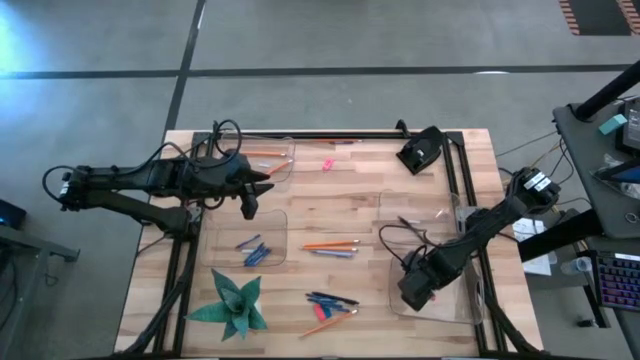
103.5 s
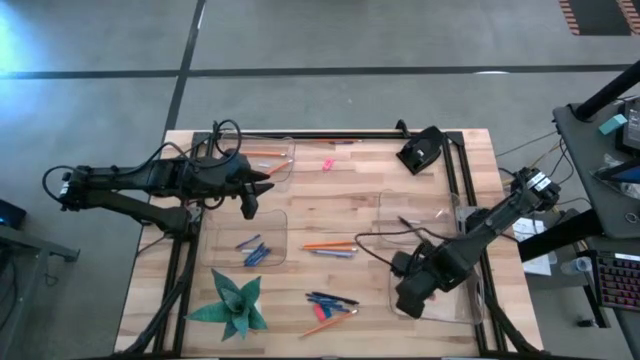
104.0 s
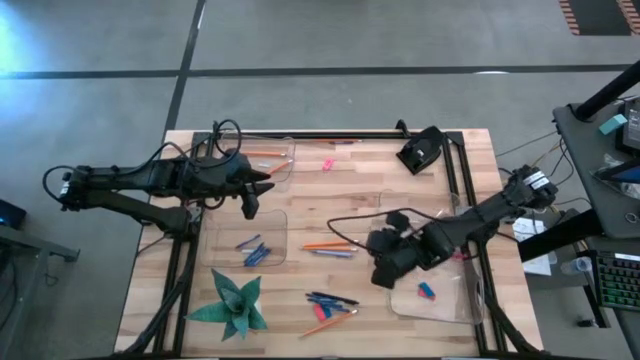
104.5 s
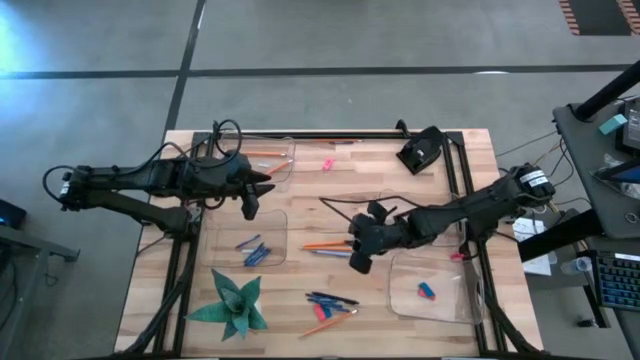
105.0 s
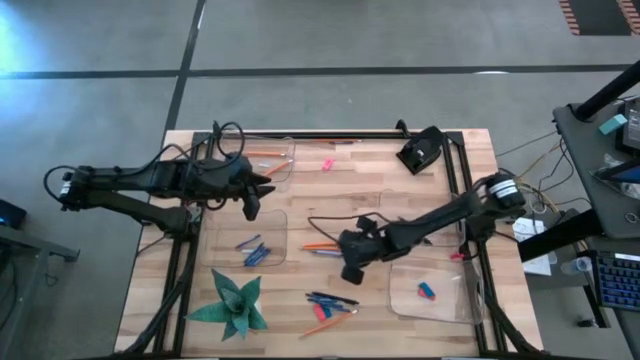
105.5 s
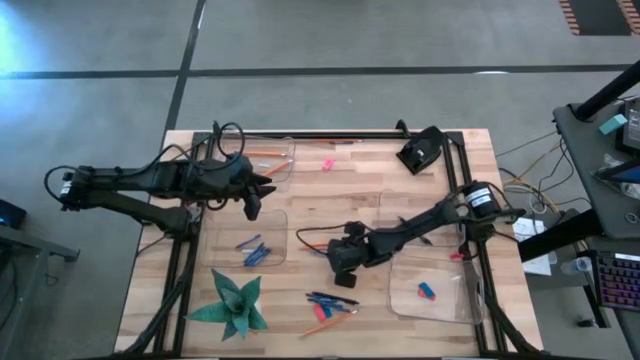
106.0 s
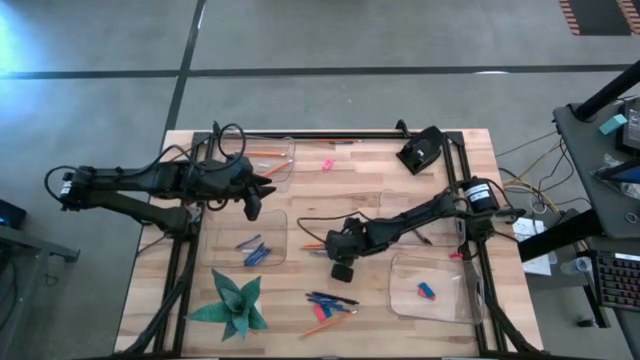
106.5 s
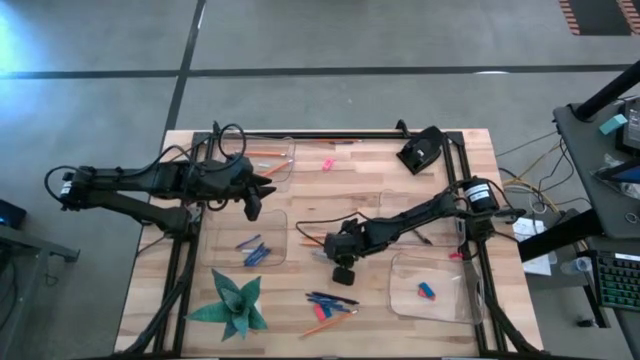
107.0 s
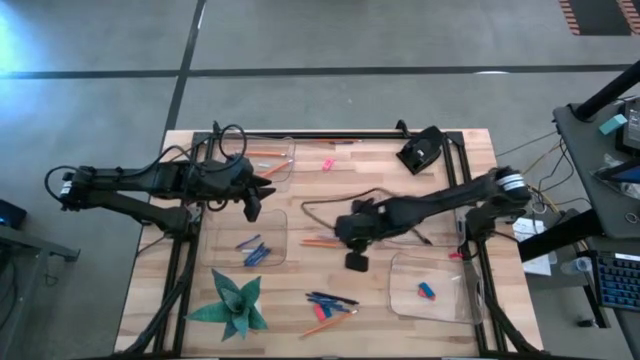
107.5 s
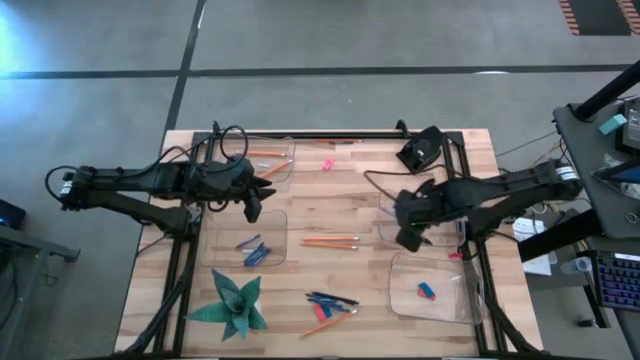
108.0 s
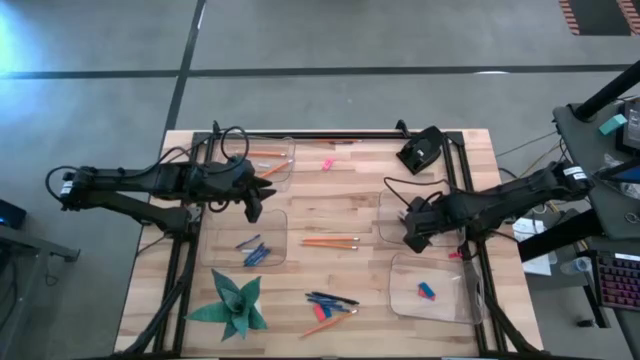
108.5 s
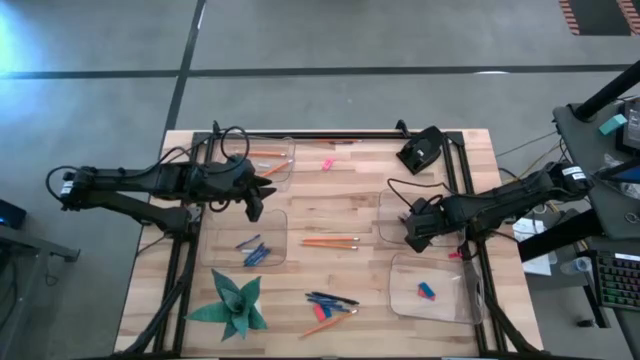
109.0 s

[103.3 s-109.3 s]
Task: Sort crayons/erasers/pens/pencils in bins
Put the light blue pen into the middle right transparent bin

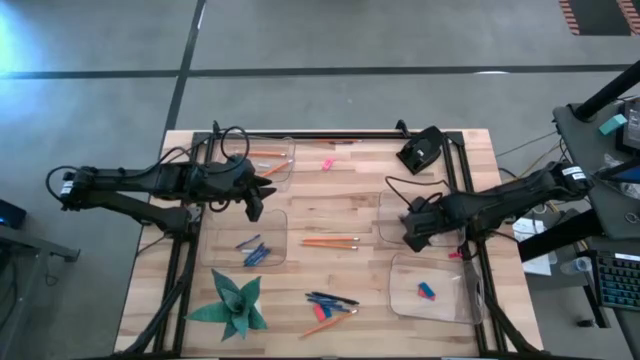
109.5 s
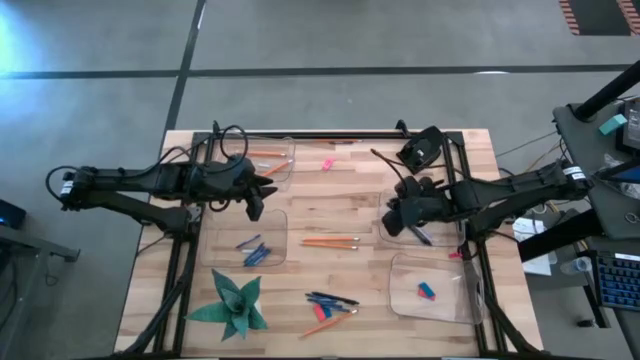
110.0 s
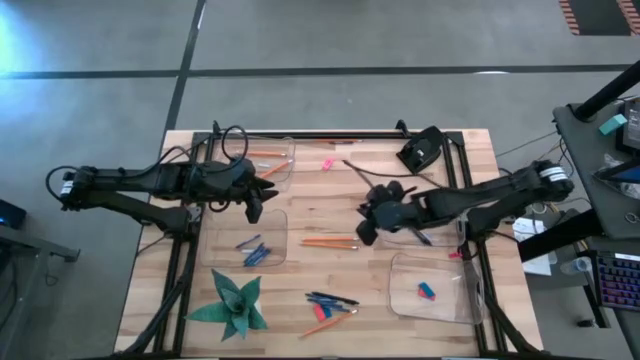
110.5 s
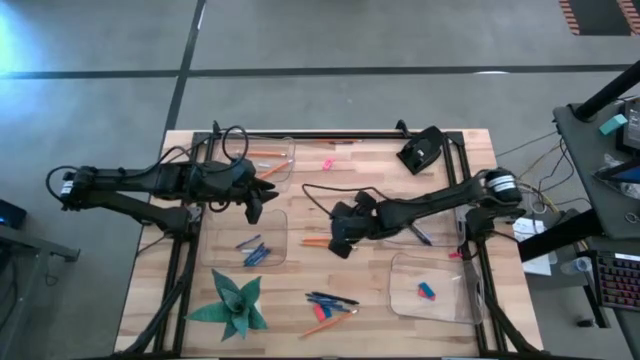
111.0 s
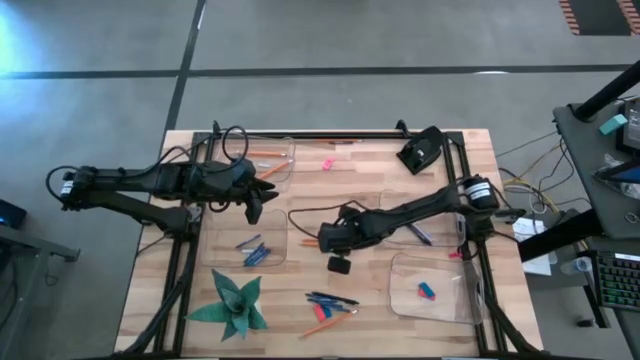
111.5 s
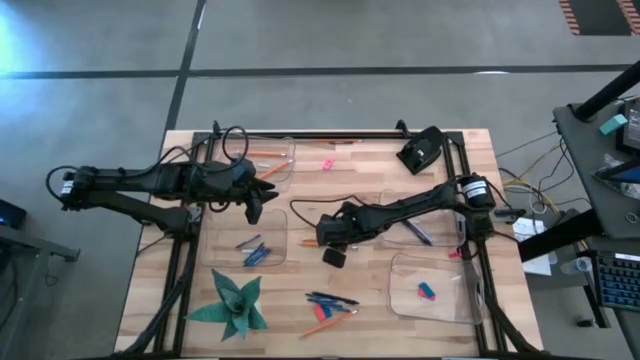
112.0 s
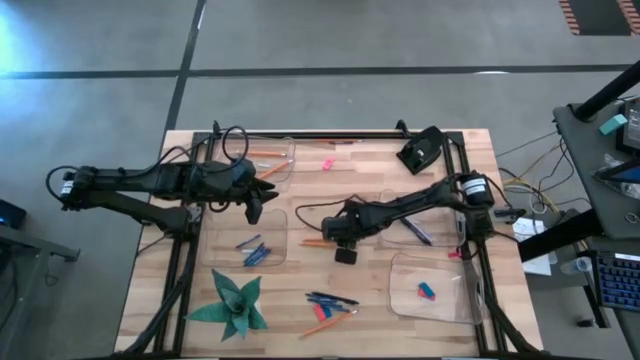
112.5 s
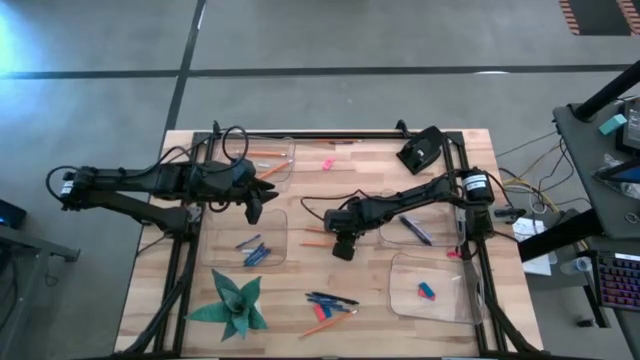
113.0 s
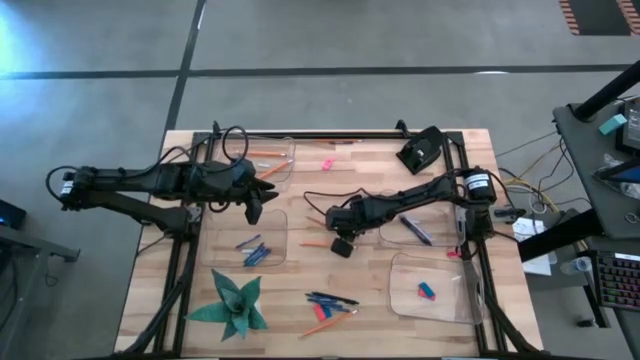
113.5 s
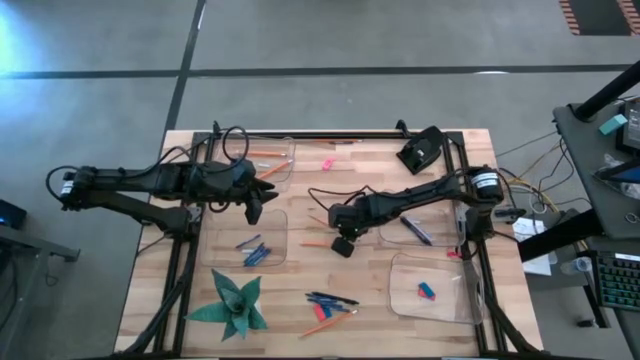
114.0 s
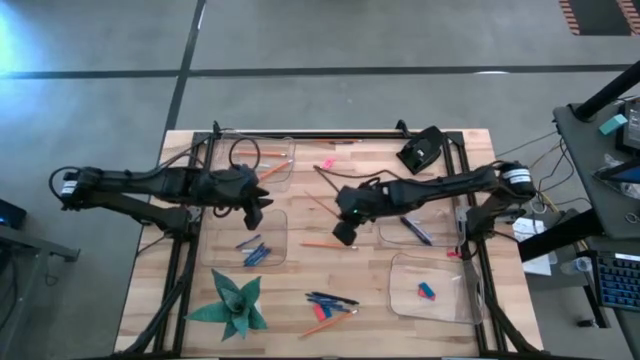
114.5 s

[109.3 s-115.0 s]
Put the pencil into the top left transparent bin

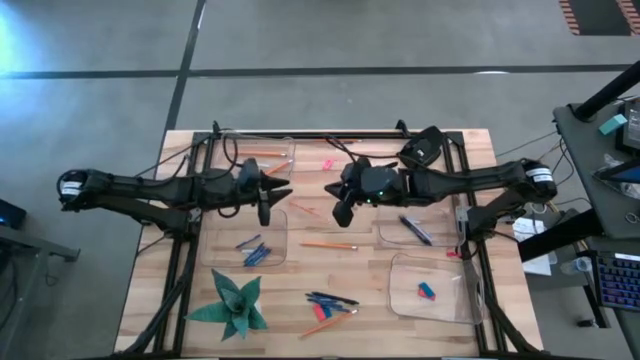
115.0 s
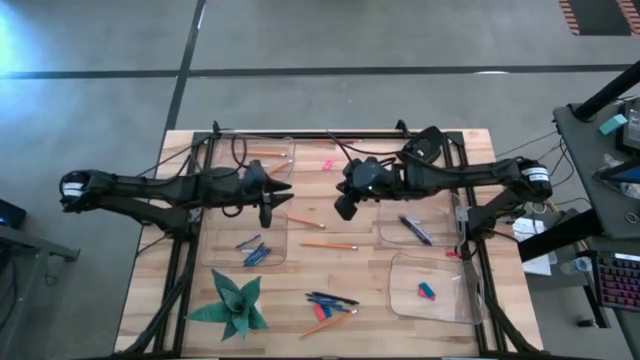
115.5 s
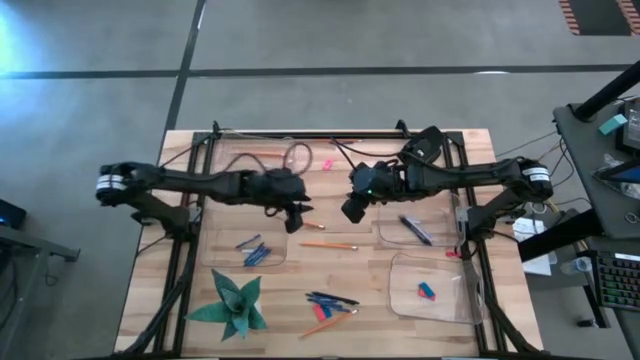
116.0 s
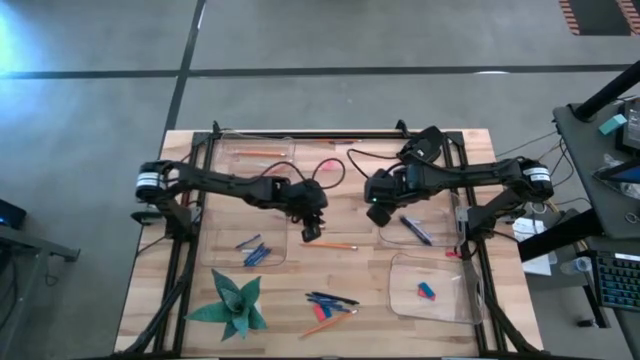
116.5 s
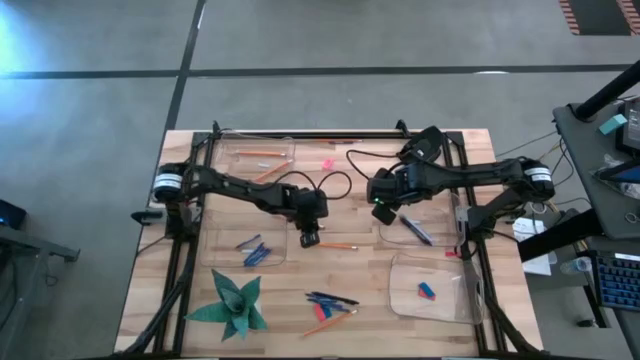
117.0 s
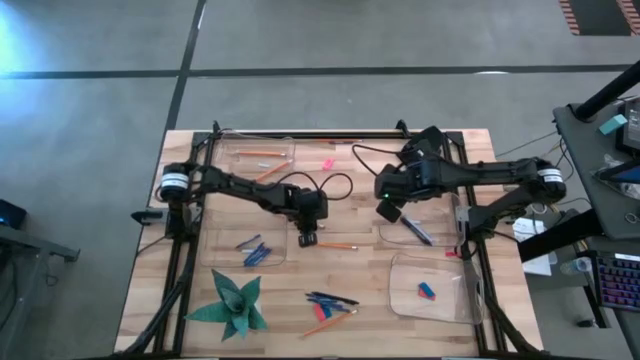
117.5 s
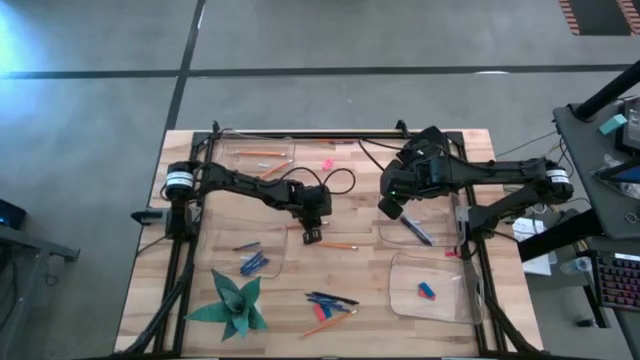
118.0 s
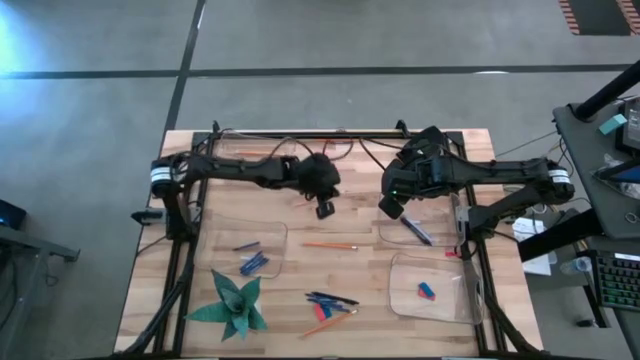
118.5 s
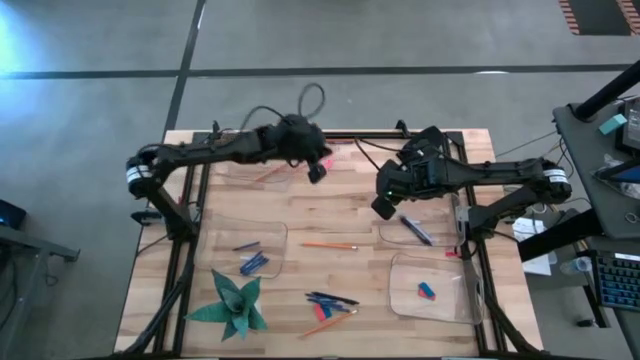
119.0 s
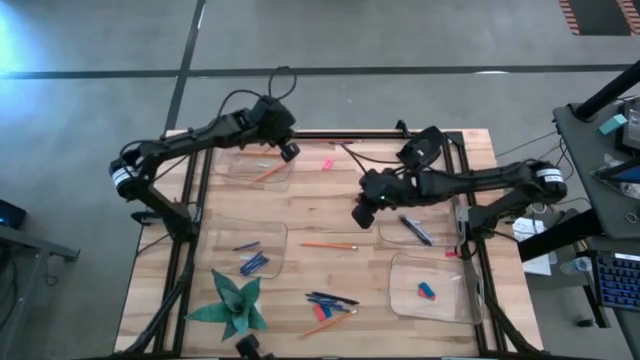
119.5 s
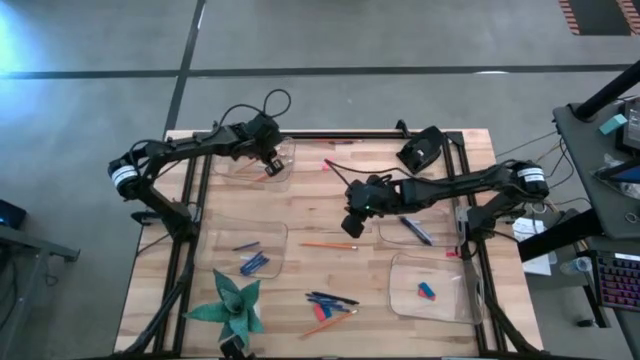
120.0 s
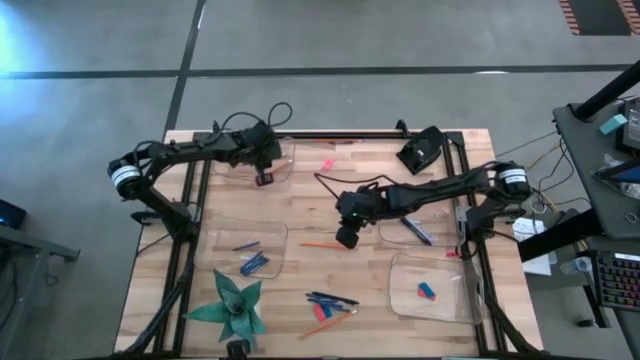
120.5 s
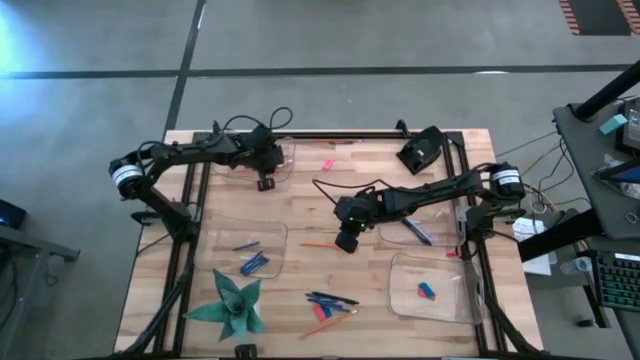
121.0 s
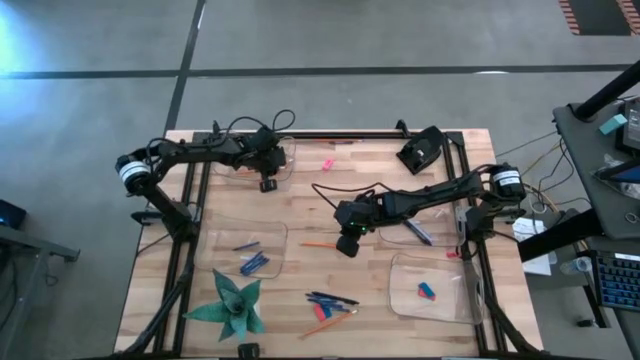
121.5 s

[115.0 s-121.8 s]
Put the pencil into the top left transparent bin

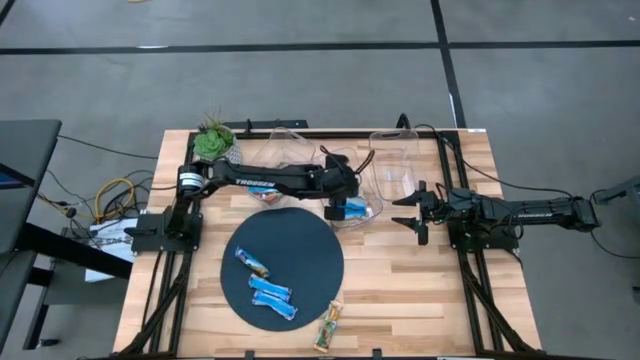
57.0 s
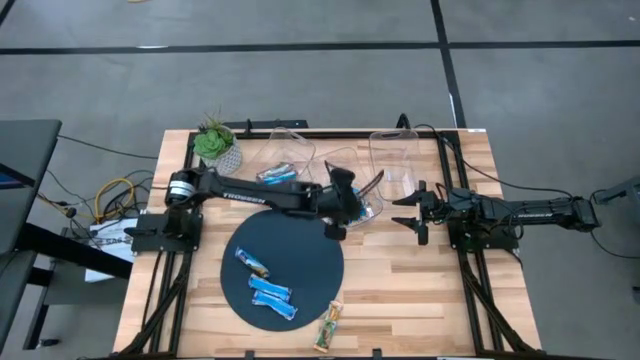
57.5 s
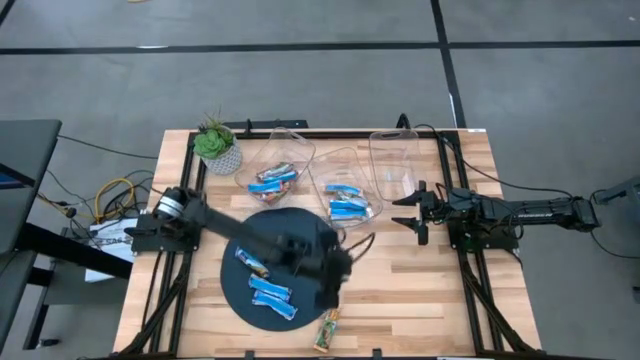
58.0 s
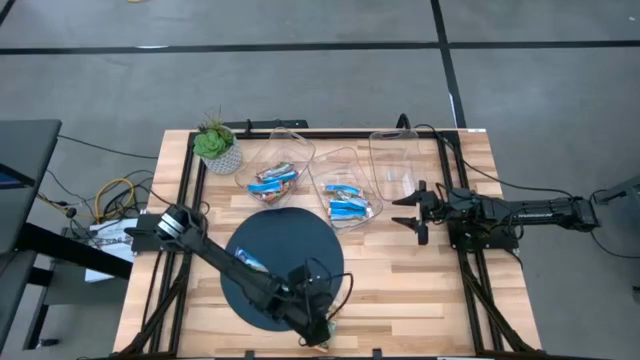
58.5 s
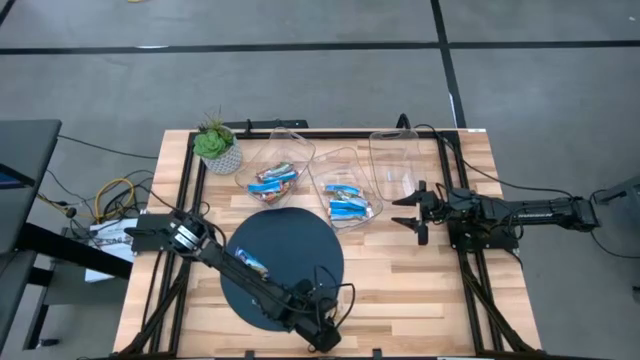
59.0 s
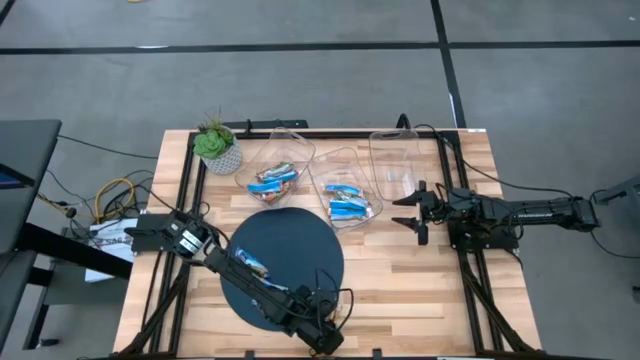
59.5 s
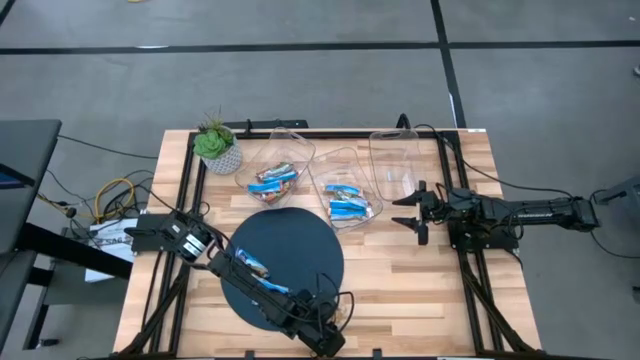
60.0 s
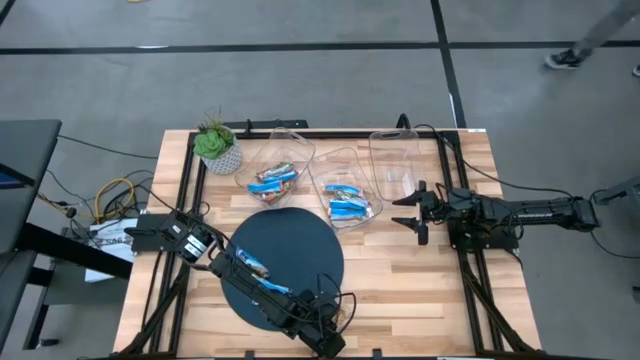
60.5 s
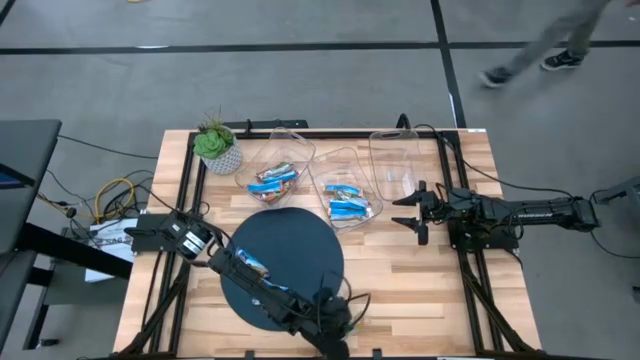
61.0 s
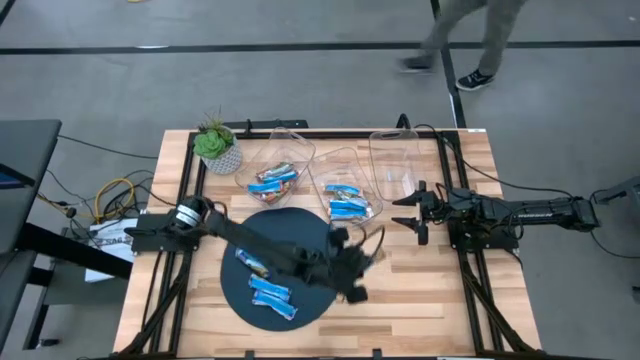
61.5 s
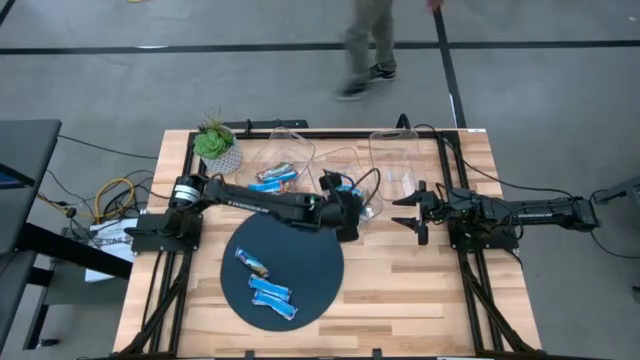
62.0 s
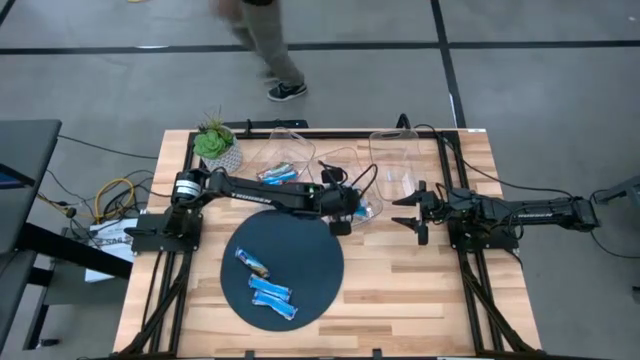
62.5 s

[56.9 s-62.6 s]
Task: Pick and place Granola Bars by type
Put the yellow granola bar into the middle transparent bin
